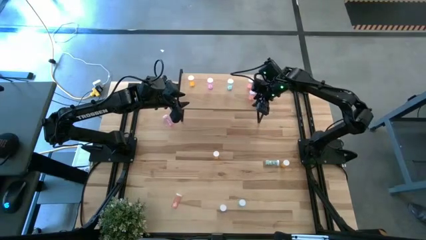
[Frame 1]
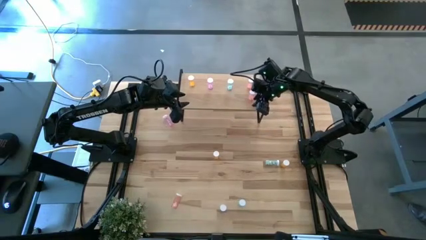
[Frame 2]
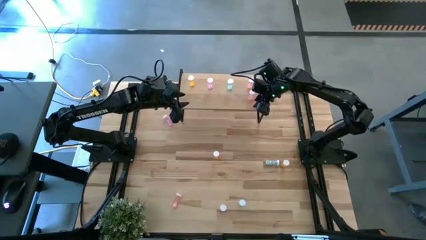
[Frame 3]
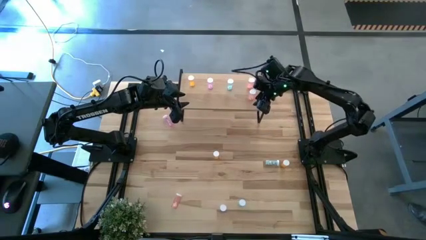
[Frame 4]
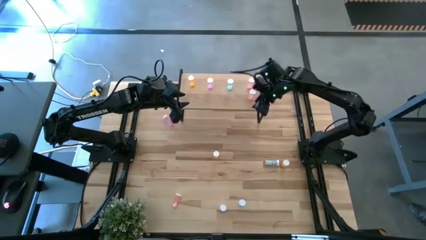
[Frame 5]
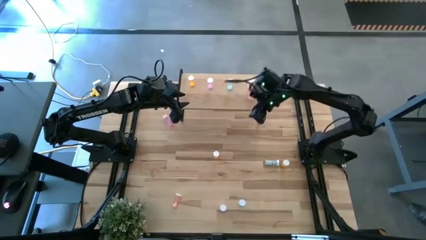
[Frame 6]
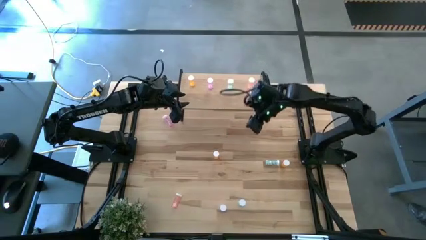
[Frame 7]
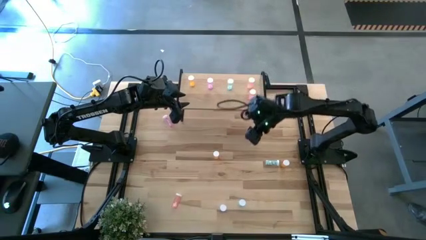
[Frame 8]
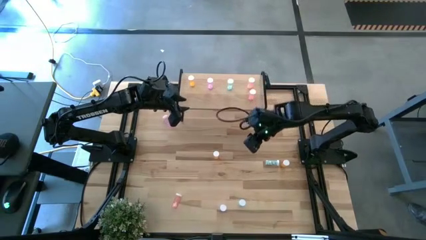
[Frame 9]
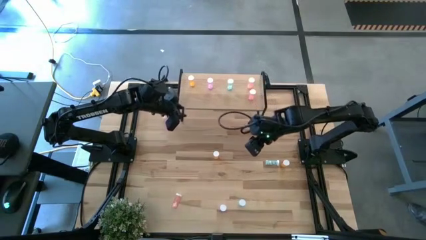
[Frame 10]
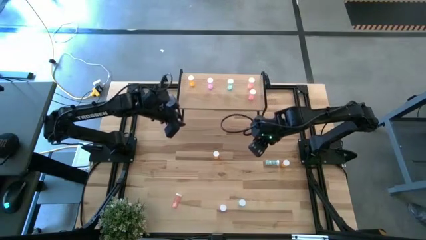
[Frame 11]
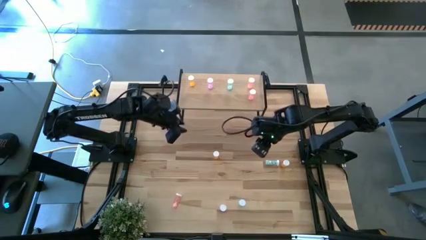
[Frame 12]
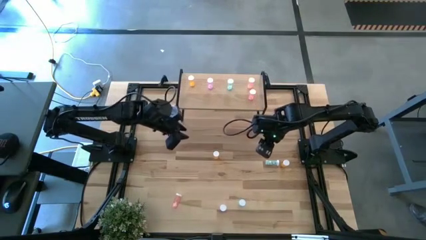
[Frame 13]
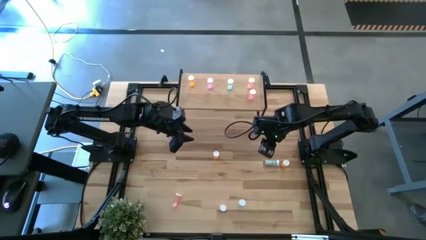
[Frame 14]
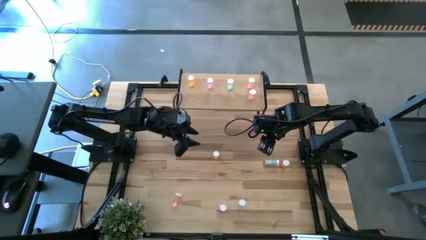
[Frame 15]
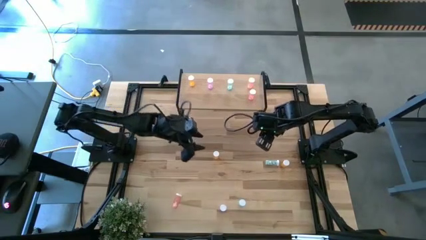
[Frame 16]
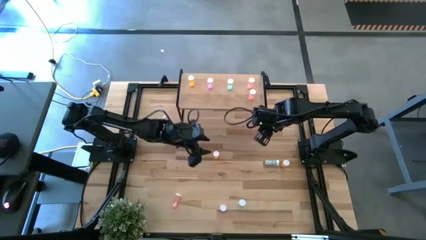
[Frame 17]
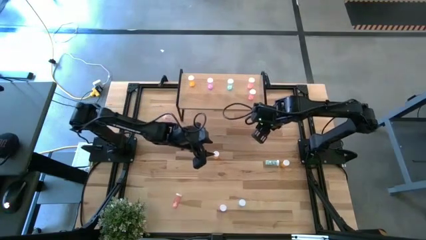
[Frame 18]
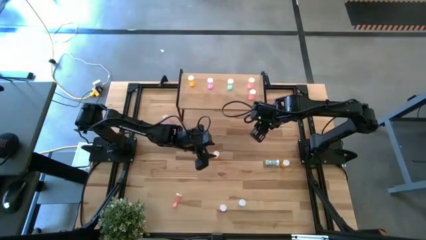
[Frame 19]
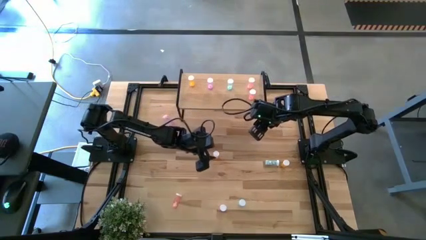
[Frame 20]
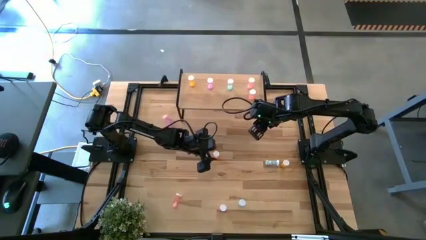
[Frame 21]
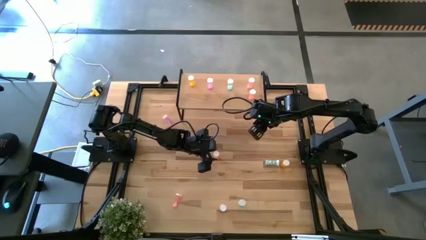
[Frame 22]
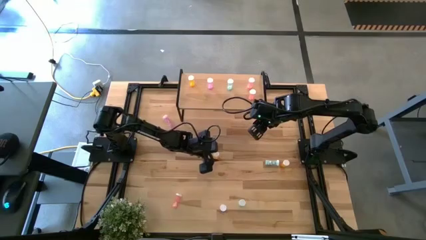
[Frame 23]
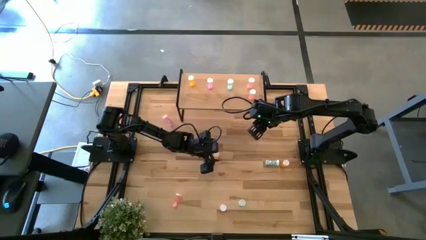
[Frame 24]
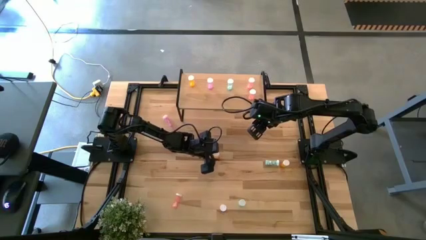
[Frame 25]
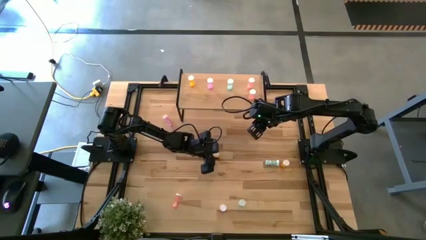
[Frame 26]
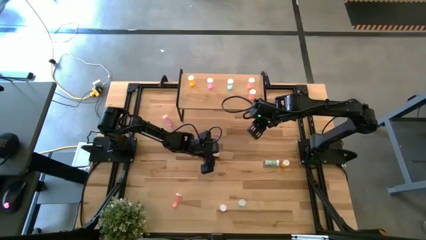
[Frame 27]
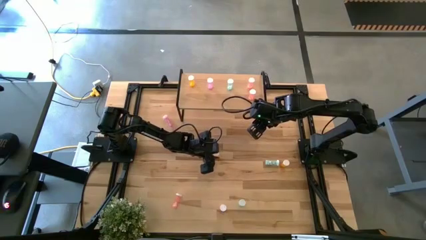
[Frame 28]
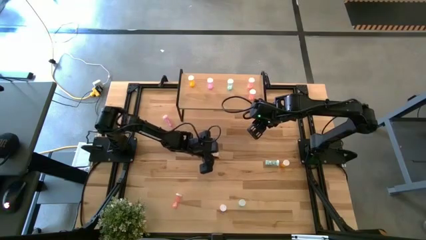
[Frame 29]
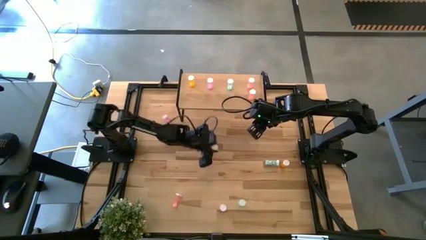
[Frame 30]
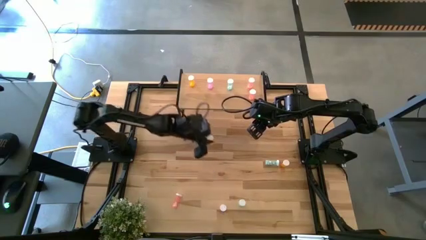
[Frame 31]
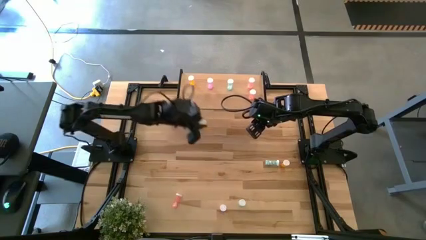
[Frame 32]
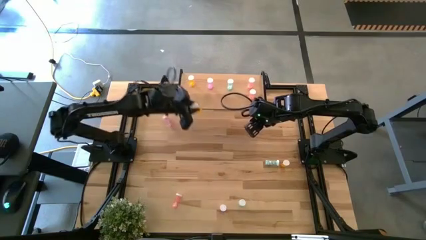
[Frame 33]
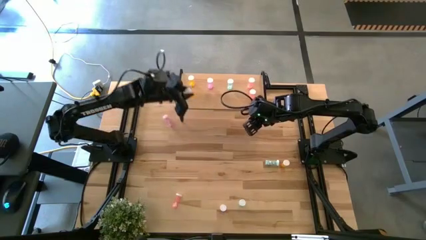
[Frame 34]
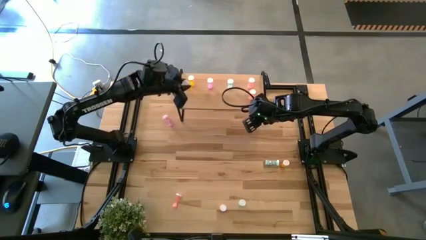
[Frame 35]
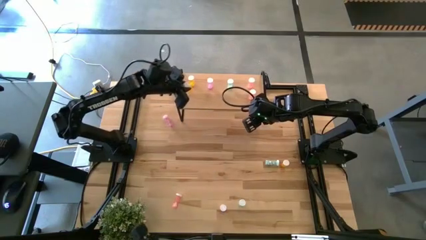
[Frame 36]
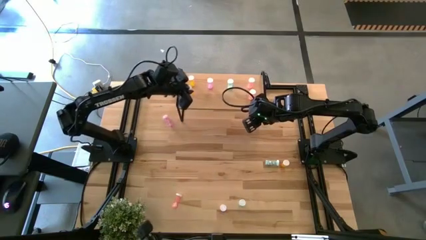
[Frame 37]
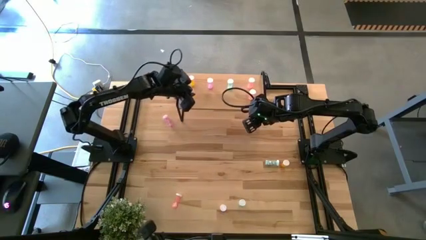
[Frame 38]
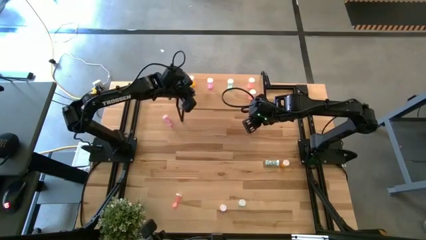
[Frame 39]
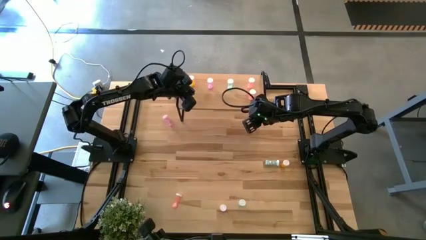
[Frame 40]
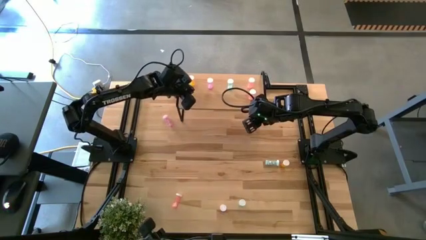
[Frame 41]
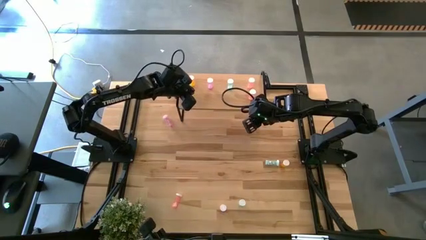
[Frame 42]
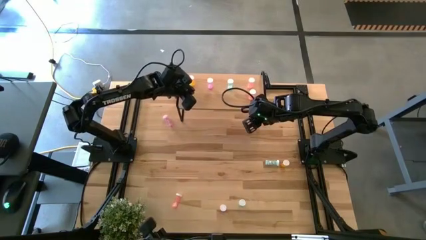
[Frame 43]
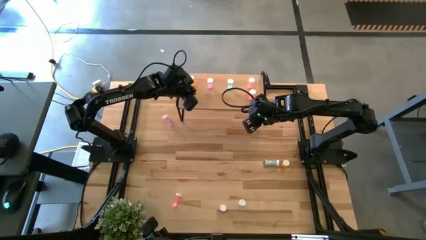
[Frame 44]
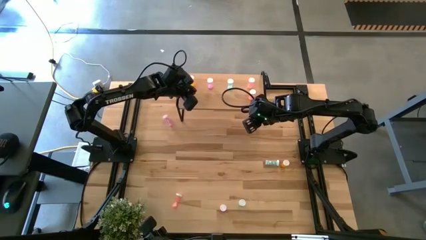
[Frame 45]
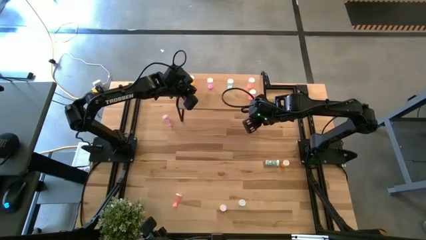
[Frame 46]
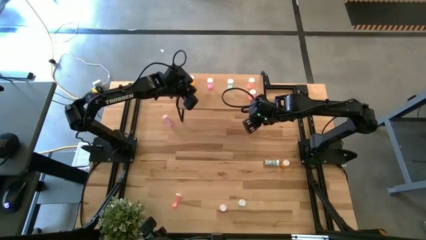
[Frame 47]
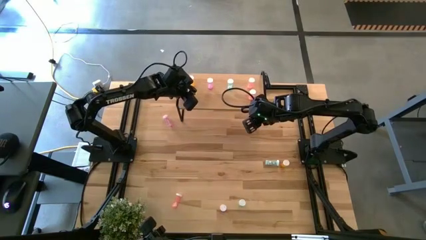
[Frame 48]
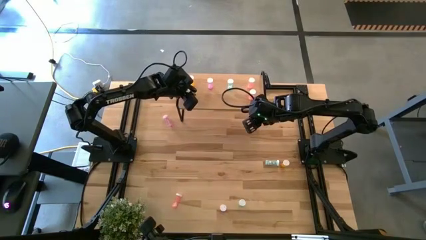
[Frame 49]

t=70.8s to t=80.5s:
Task: Pick and place medicine bottles onto shelf by color
Put the top orange medicine bottle on the shelf aligned with the other orange medicine bottle

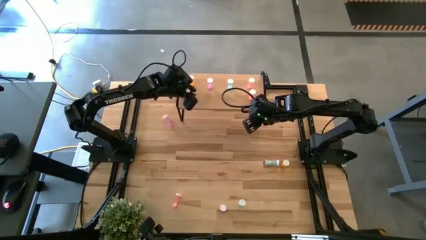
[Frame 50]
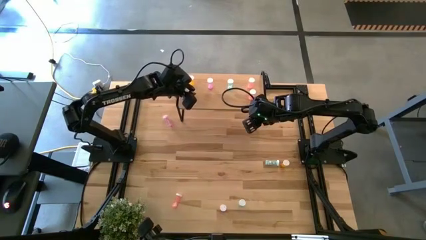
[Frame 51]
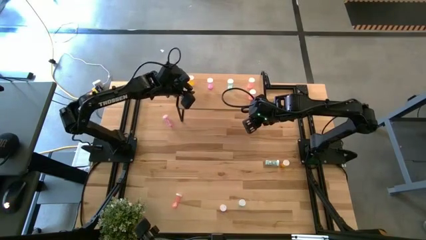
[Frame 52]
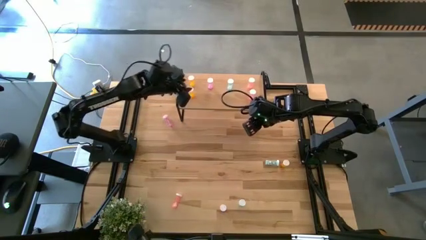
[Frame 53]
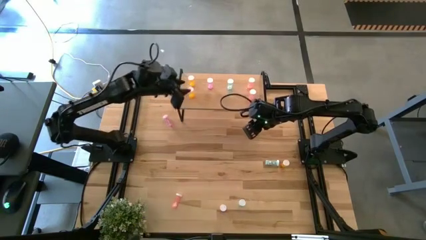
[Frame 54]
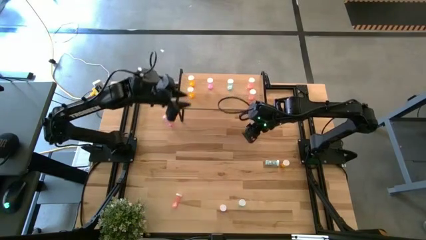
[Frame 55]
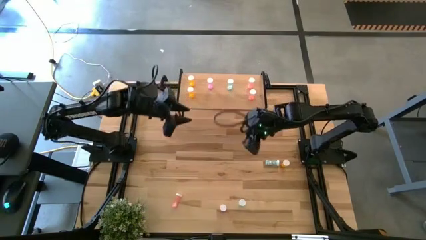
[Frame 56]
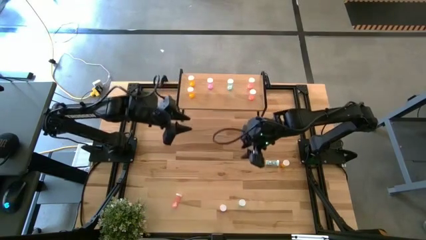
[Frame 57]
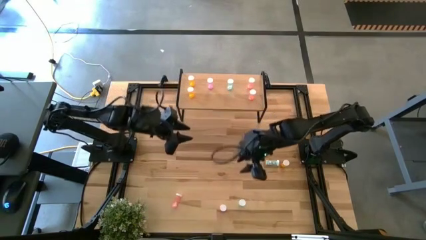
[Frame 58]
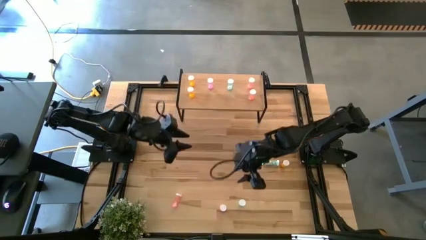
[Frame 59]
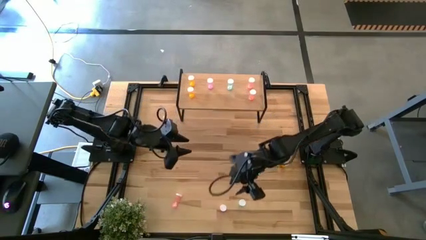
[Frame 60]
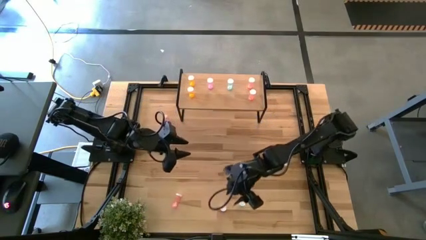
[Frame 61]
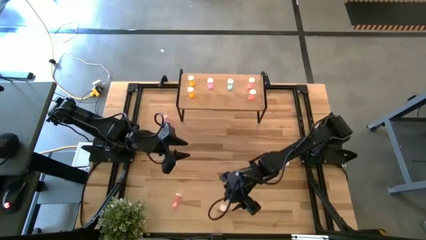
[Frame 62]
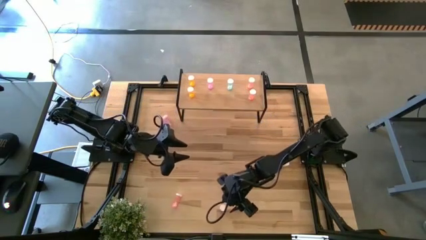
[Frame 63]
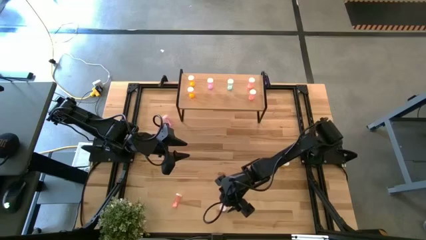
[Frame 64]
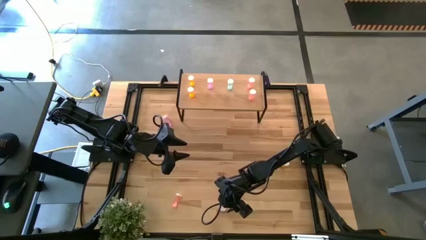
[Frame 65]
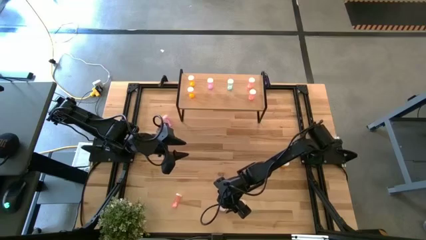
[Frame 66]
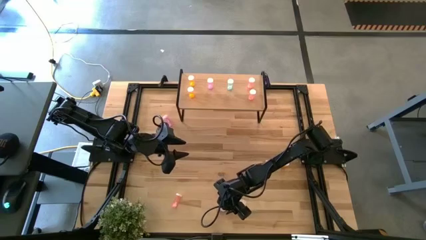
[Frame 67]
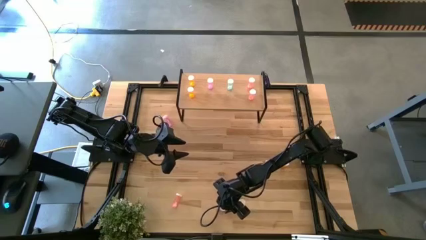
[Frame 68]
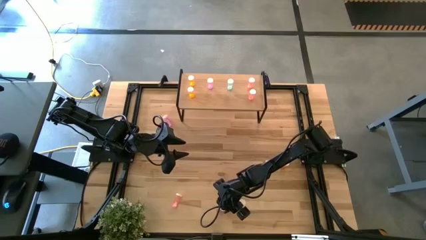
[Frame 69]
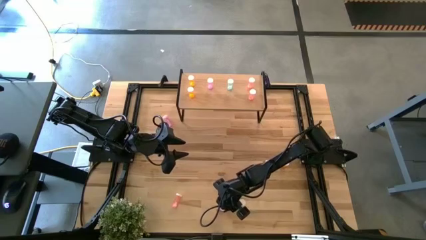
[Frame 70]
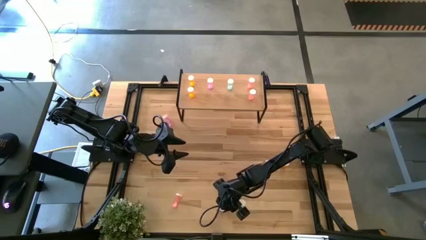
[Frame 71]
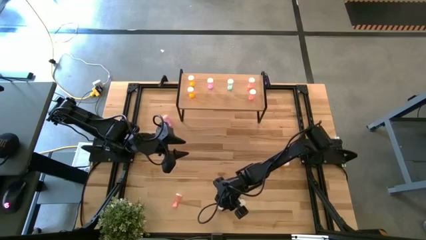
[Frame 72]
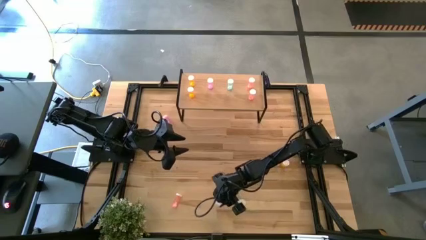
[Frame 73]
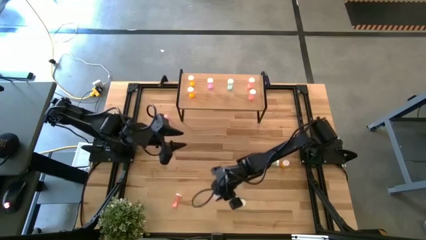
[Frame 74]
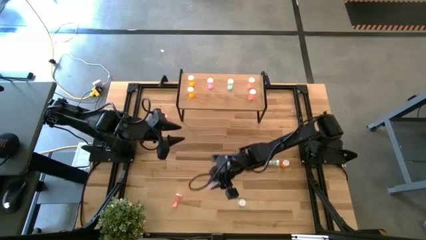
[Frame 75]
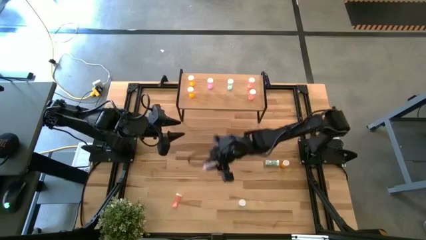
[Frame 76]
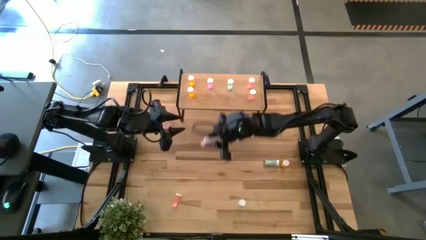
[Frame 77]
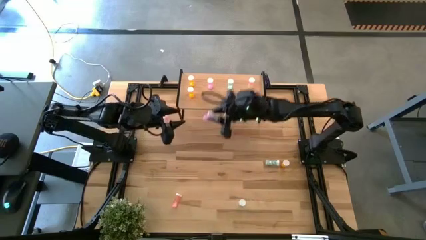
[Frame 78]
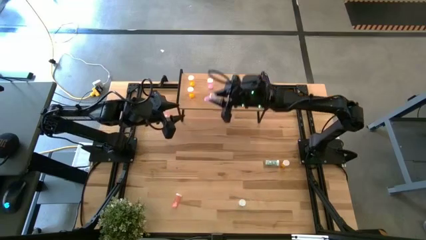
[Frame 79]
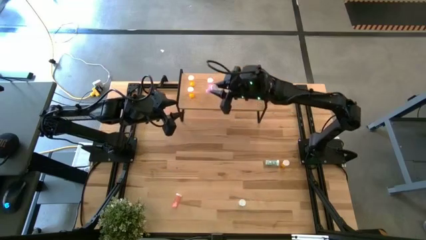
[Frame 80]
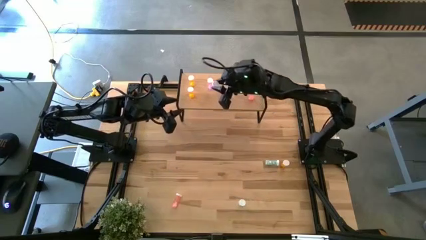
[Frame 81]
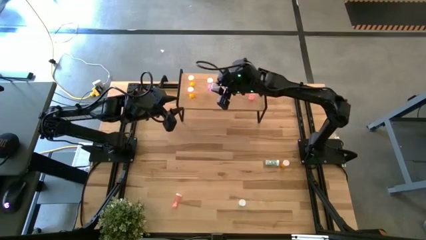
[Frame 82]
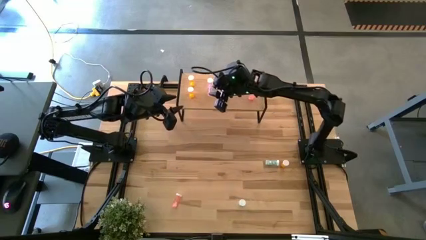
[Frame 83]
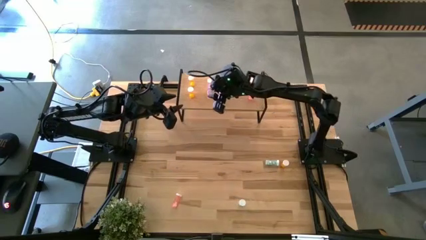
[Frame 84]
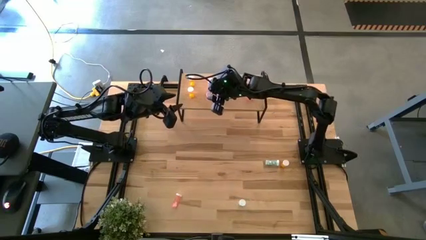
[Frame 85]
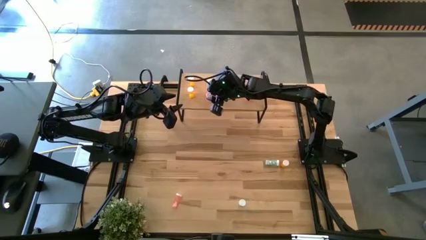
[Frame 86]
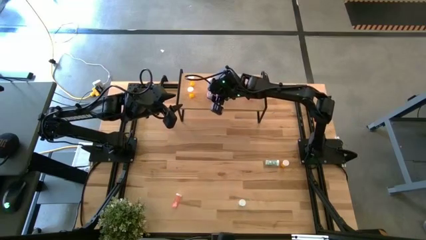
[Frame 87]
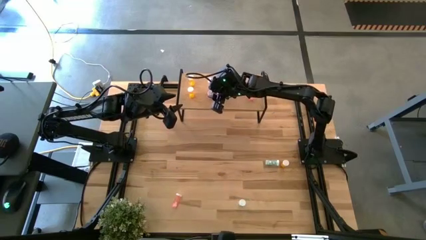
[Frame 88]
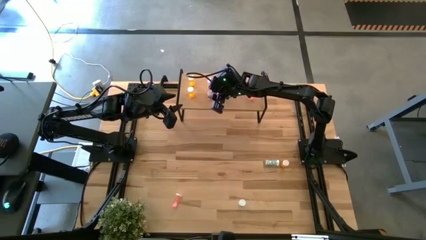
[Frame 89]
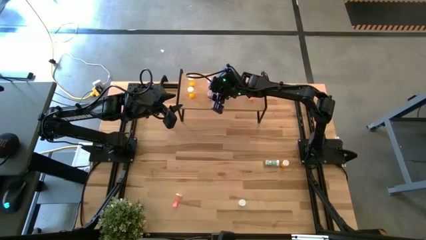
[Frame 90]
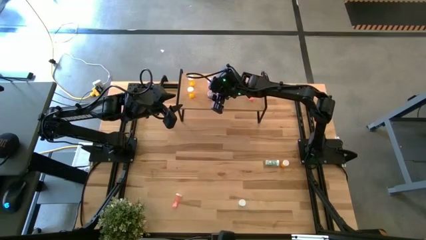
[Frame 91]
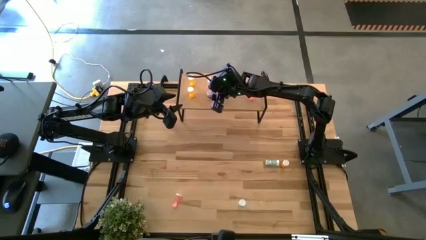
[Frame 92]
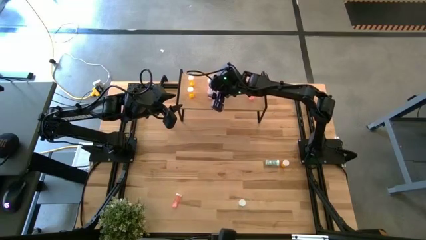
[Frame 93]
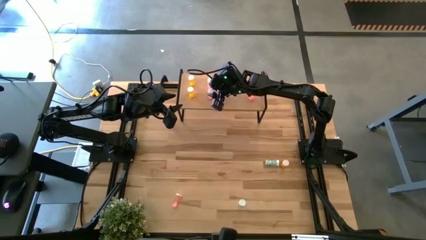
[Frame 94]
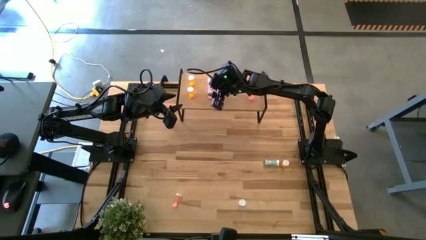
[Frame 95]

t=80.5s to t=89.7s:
Put the bottom purple medicine bottle on the shelf aligned with the other purple medicine bottle
